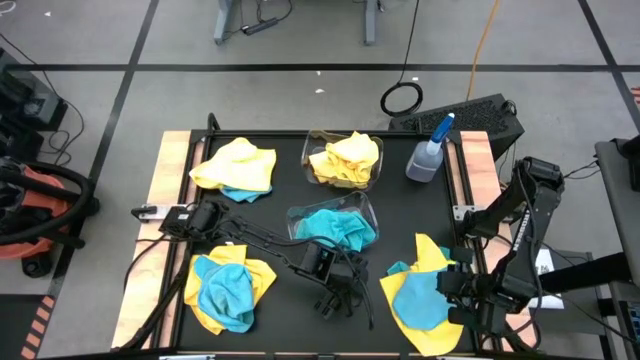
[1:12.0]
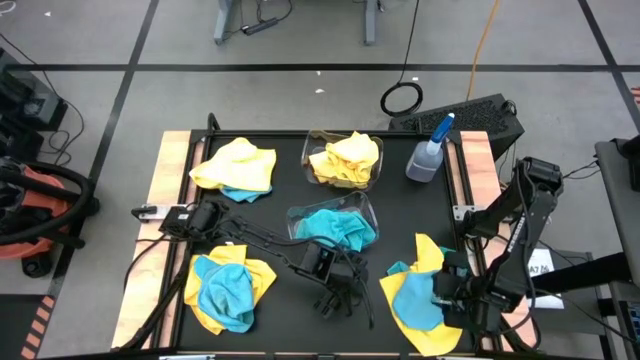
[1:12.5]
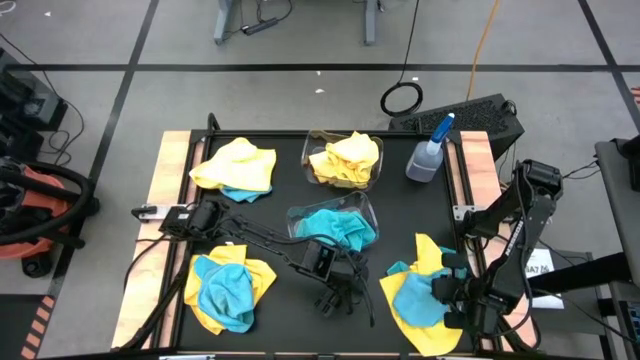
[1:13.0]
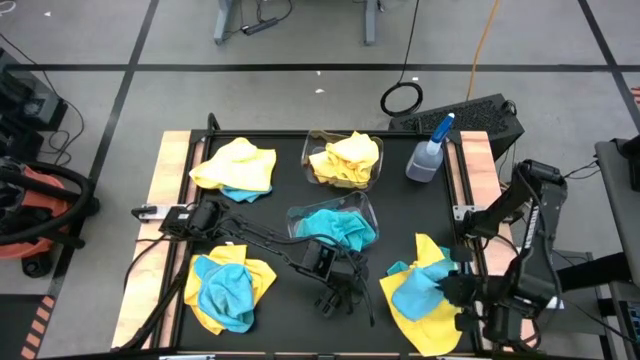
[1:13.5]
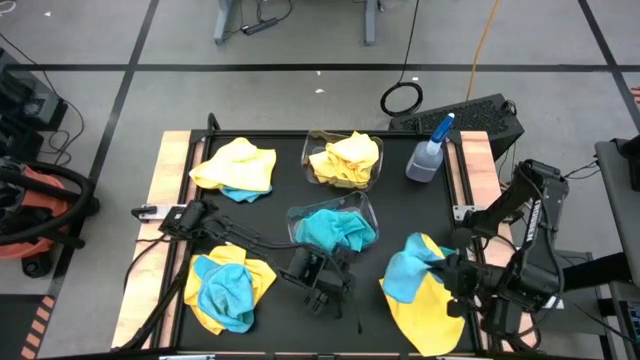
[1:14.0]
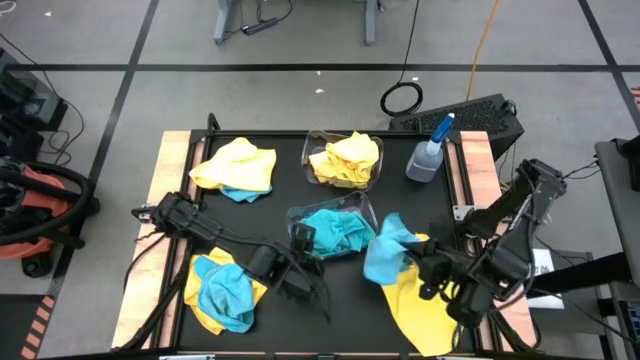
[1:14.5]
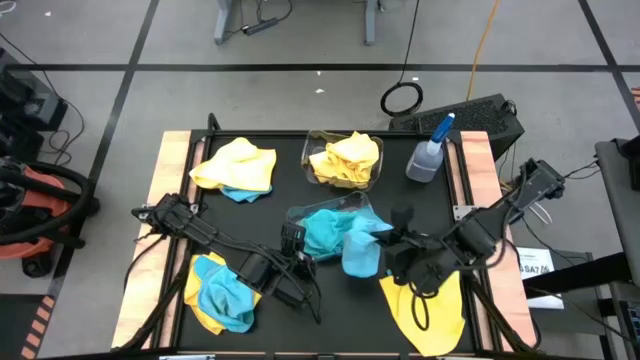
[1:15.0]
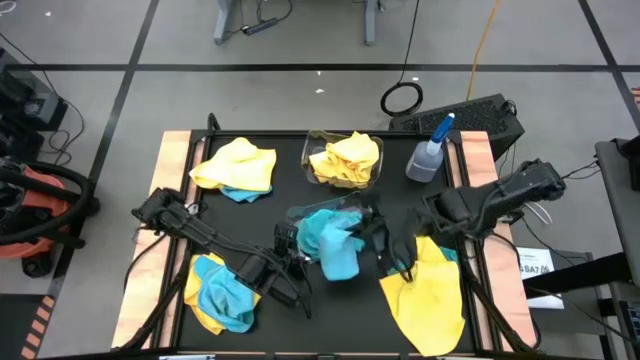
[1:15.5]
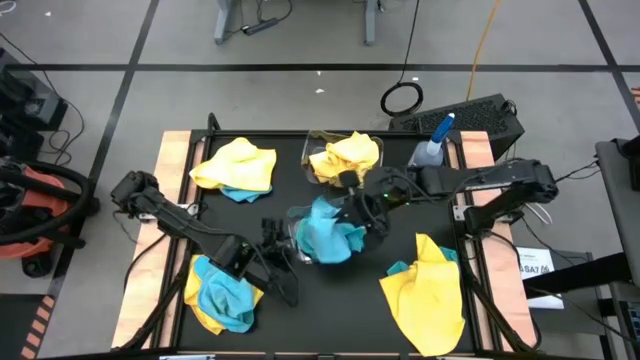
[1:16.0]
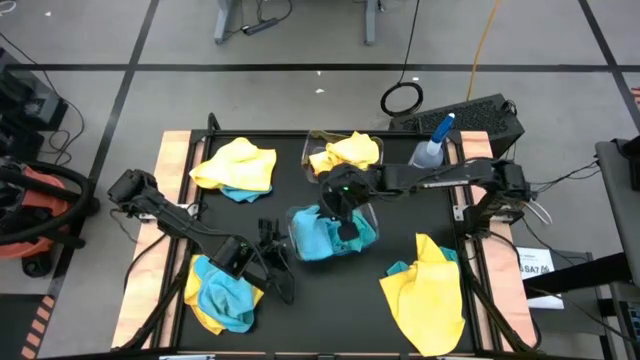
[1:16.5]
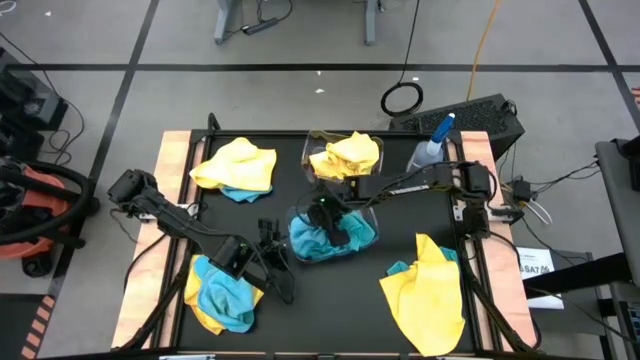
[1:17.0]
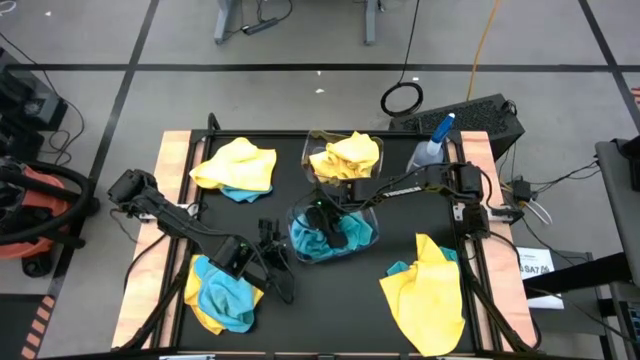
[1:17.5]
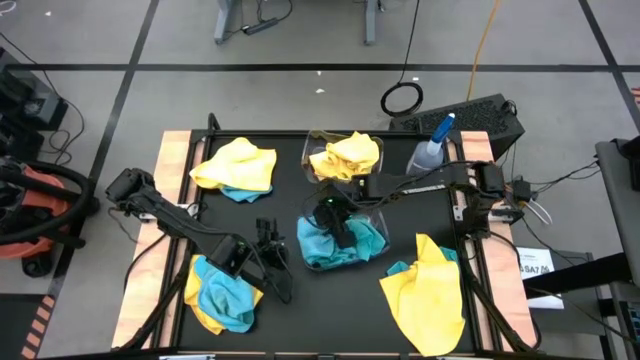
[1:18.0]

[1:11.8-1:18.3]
Task: Sort microfiber towel by color & place in baskets
Put the blue microfiber cloth into the bottom transparent bin

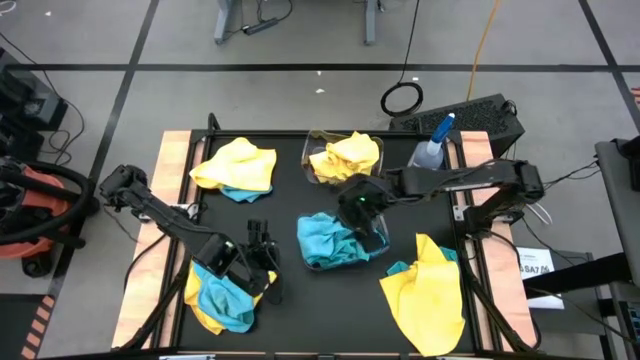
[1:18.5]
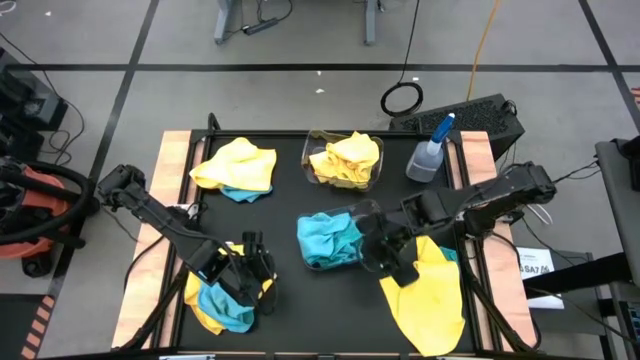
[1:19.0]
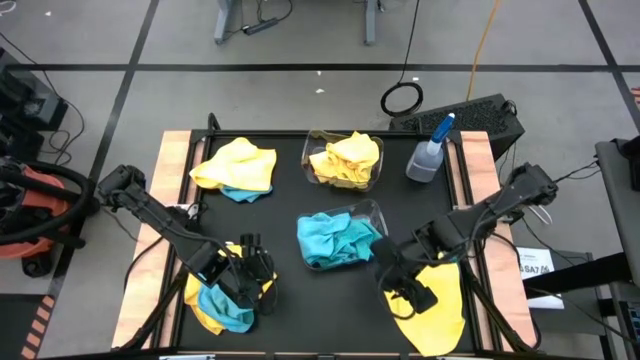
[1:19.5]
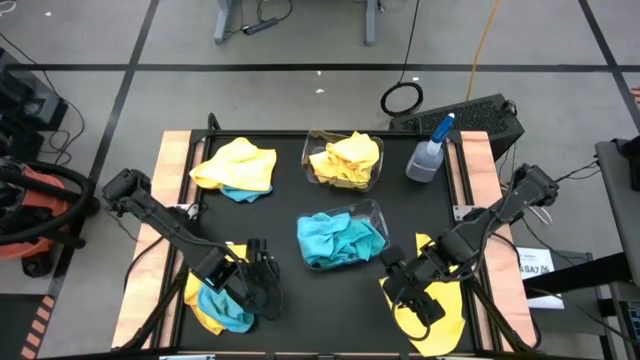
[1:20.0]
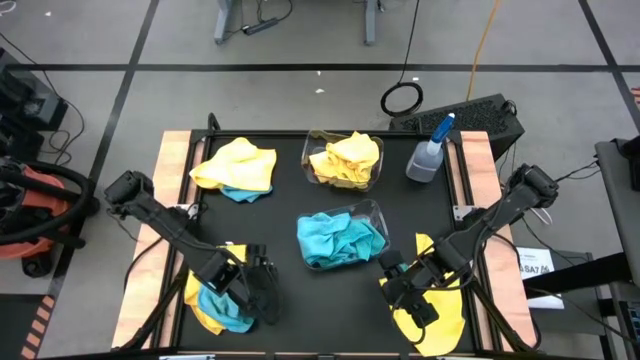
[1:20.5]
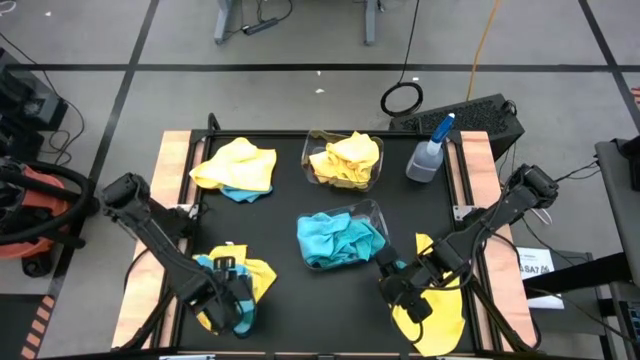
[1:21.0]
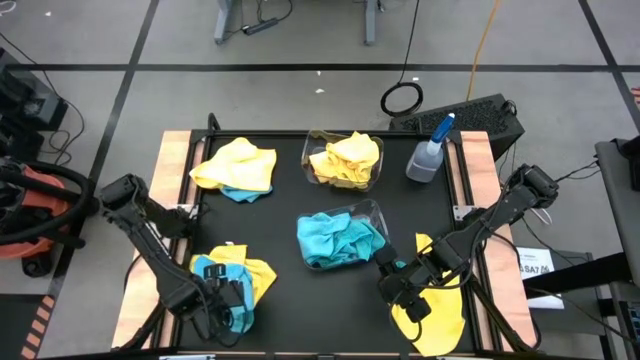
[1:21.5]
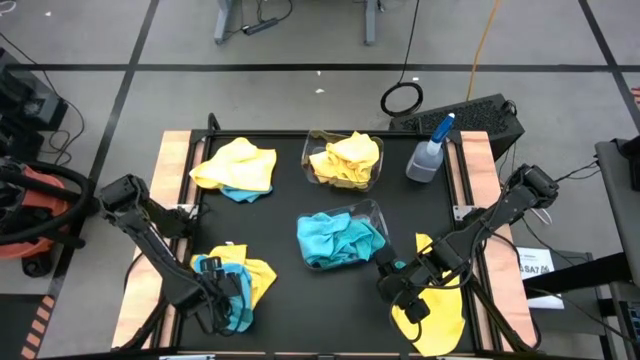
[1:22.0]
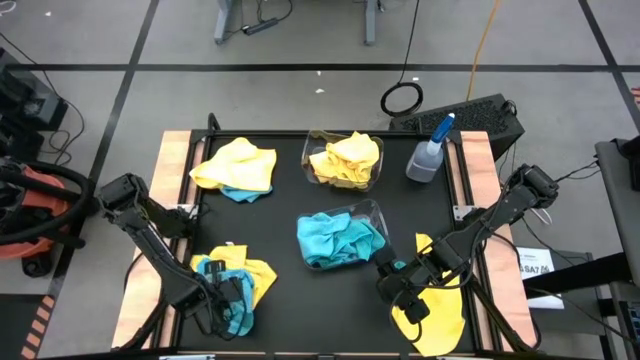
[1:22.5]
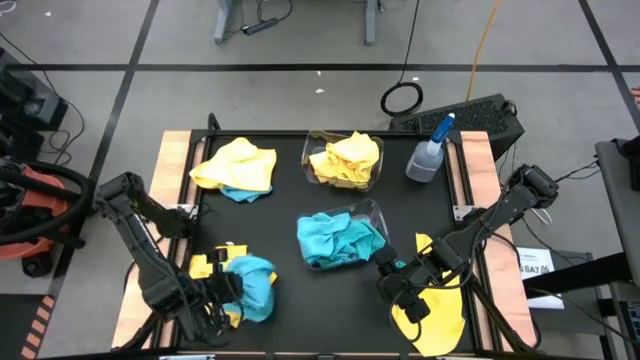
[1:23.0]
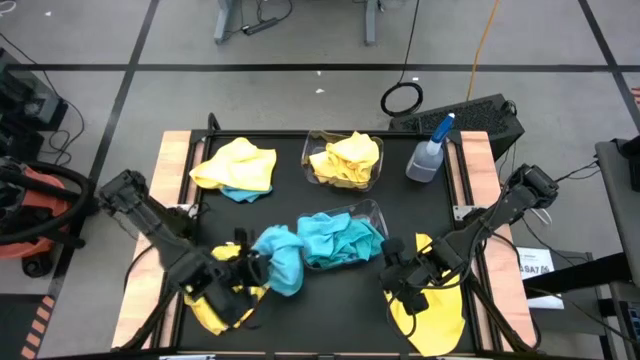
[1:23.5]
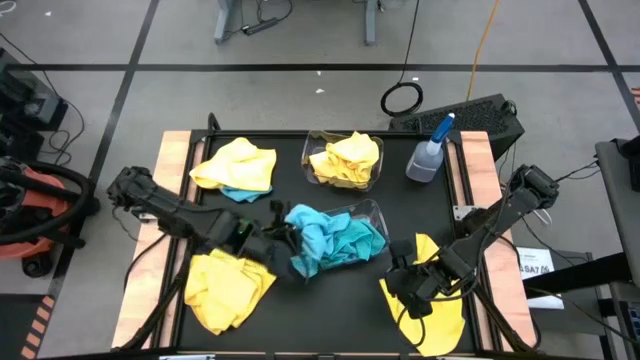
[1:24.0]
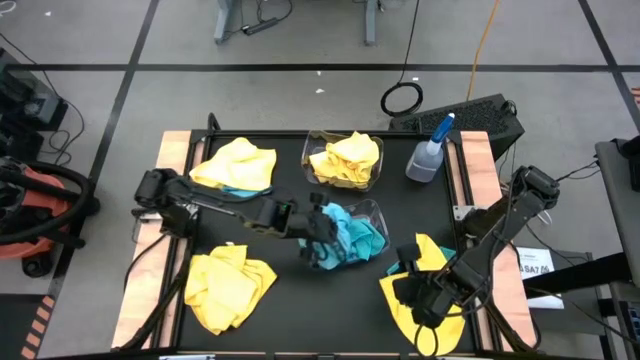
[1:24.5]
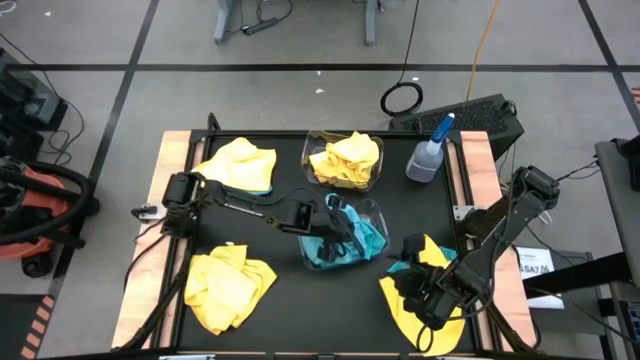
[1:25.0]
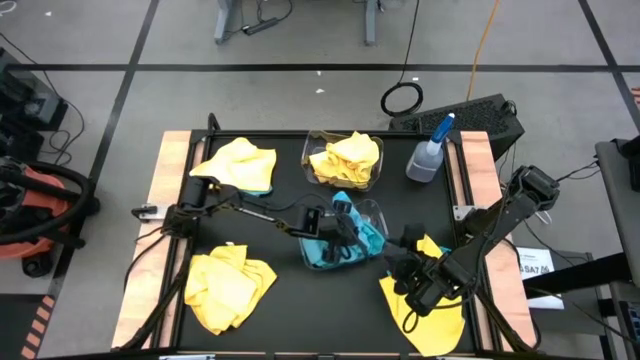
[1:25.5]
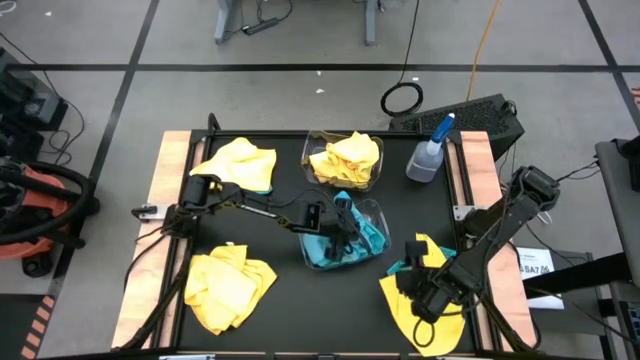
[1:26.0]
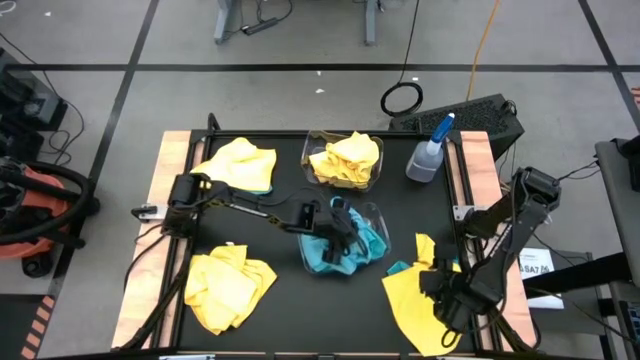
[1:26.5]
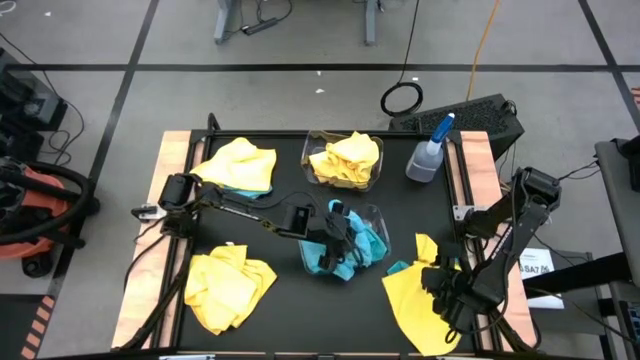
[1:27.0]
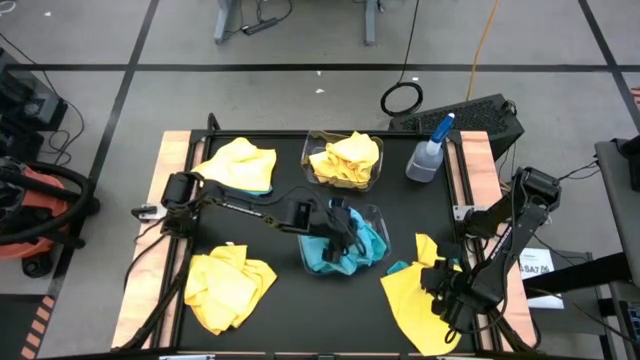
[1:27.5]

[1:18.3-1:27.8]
Put the blue microfiber cloth into the bottom transparent bin

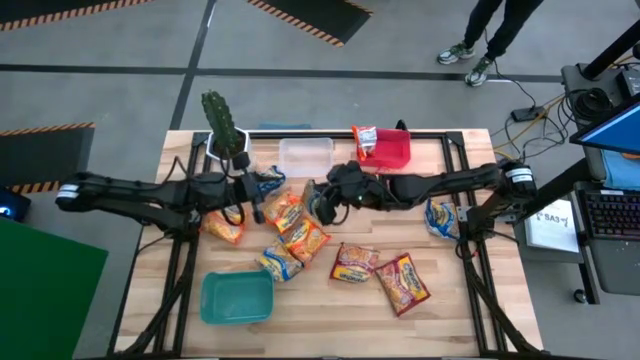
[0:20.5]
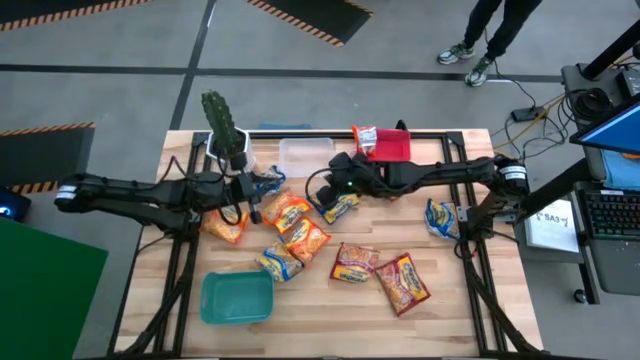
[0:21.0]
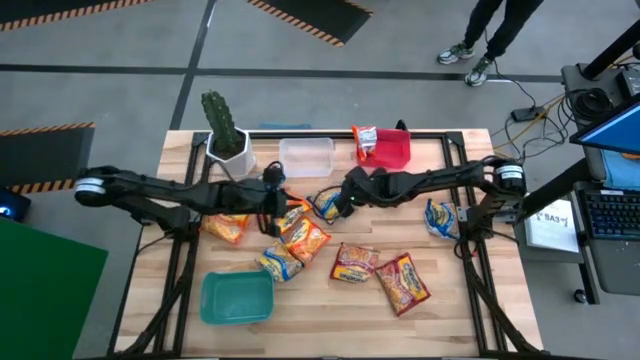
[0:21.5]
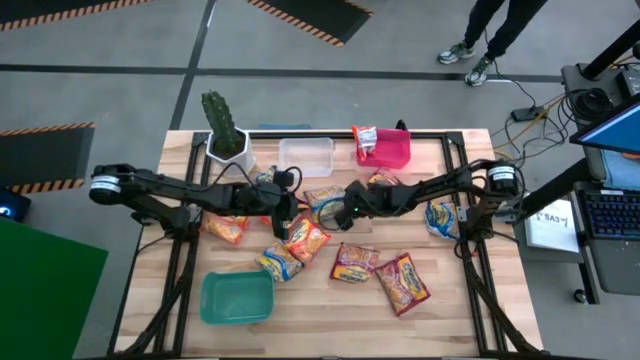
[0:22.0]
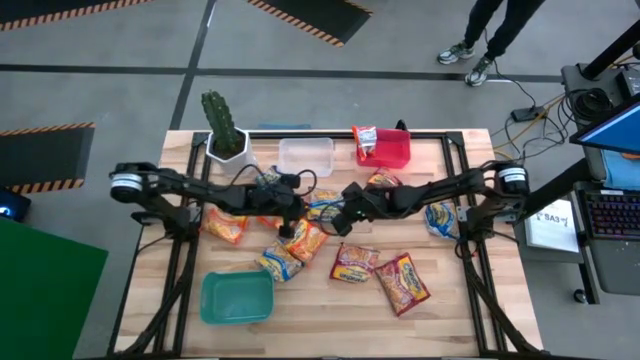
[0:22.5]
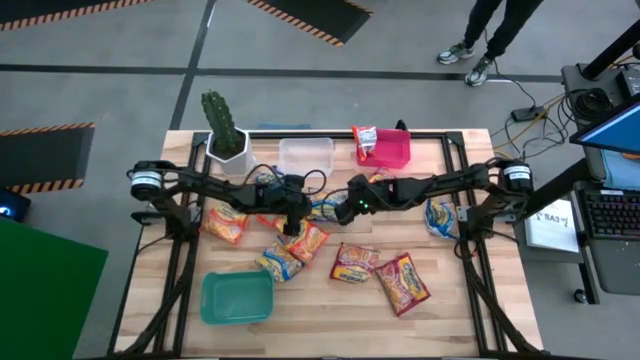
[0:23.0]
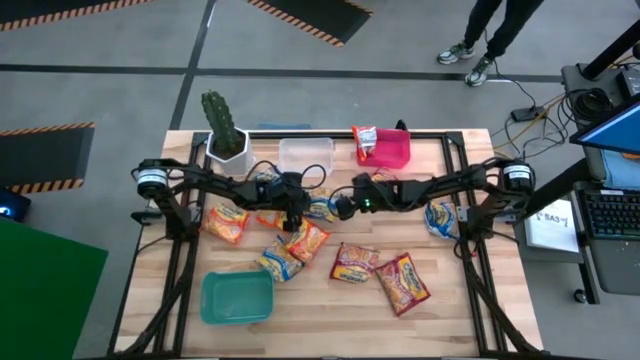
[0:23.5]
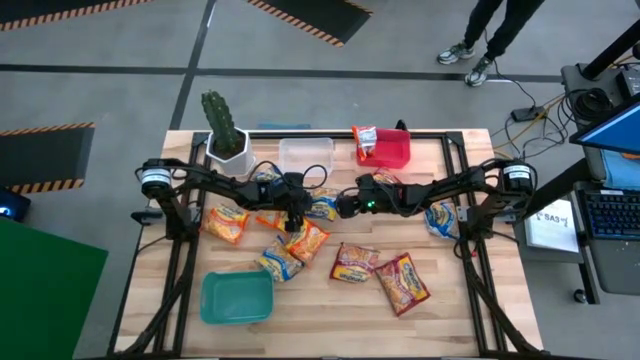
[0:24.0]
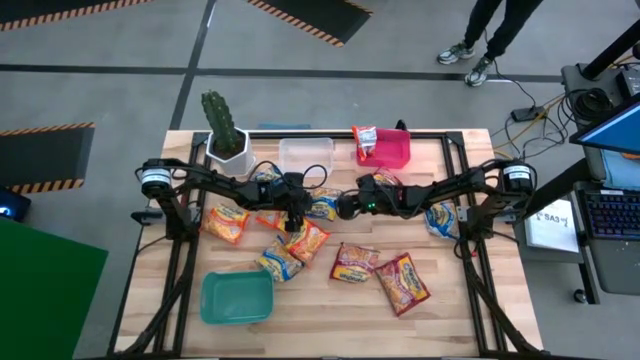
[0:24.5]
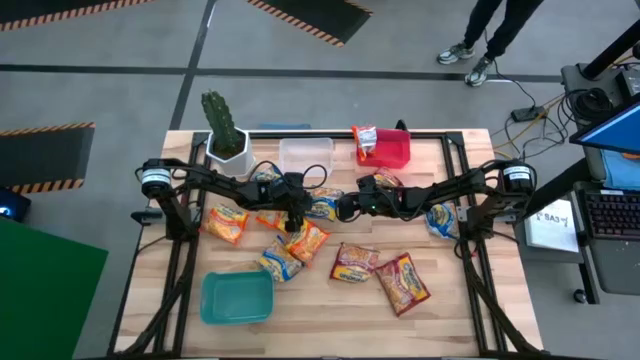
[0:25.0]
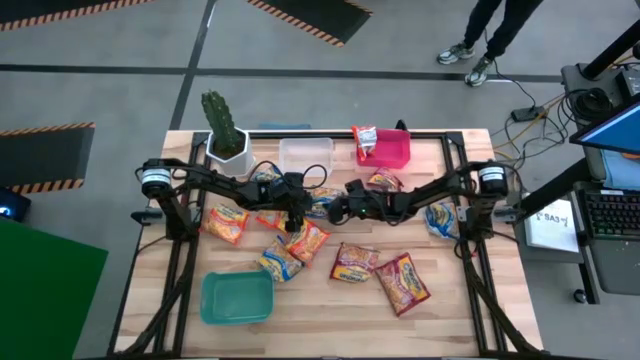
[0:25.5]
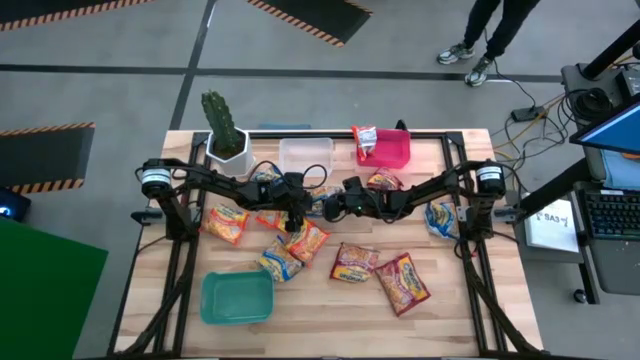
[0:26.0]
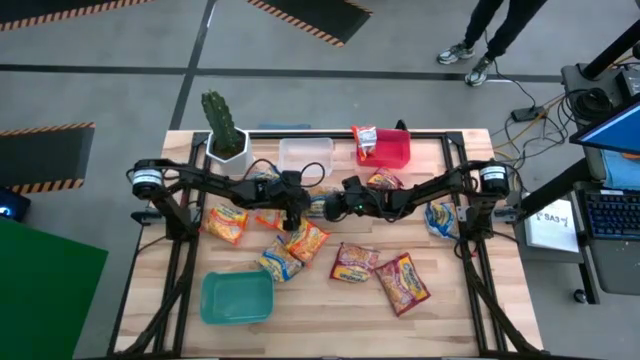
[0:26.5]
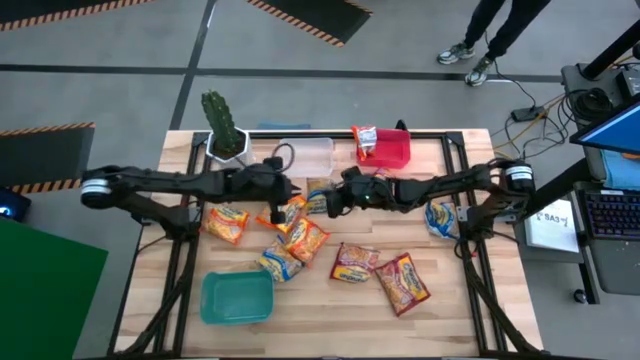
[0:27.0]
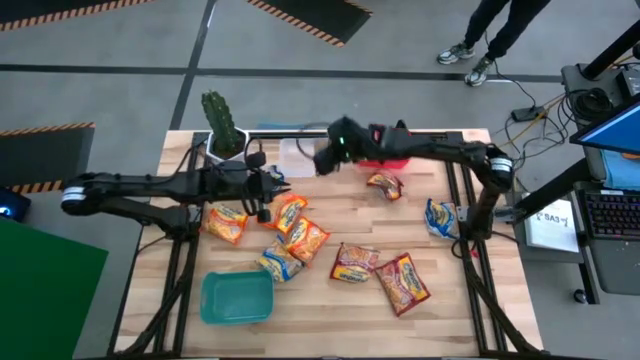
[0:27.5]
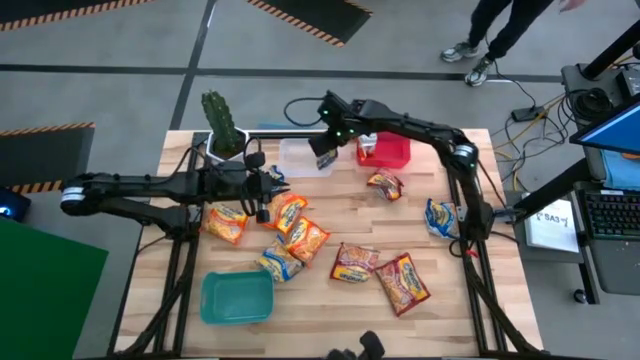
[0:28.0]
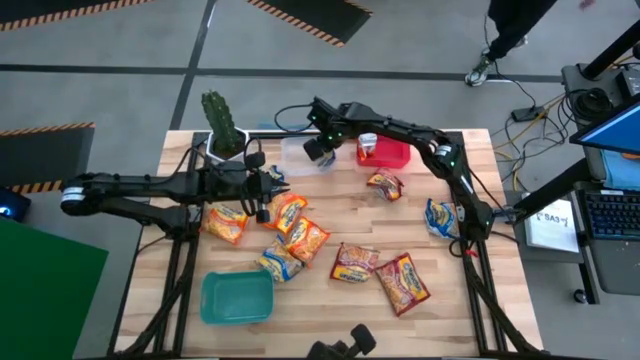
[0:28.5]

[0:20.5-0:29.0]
Task: Sort Maruchan noodles
Put the blue noodle pack into the white bin
